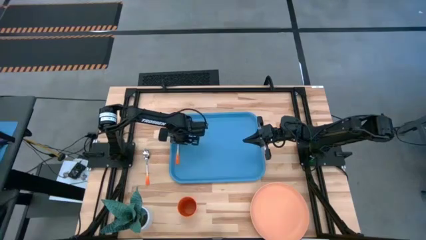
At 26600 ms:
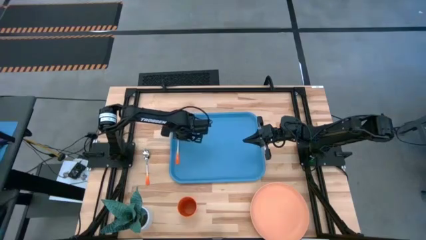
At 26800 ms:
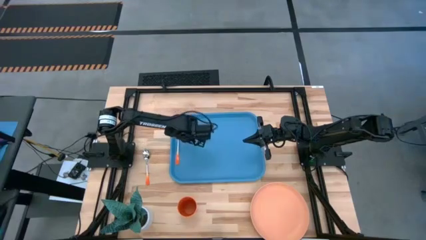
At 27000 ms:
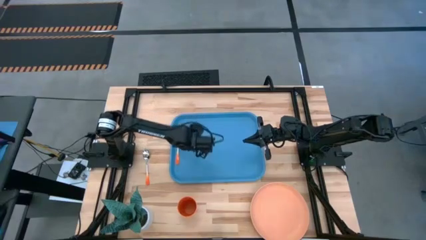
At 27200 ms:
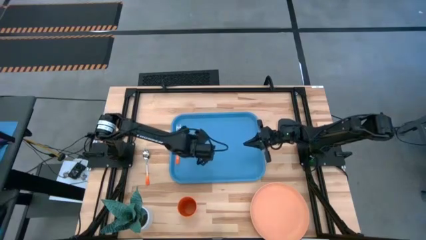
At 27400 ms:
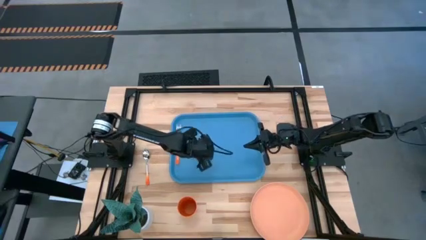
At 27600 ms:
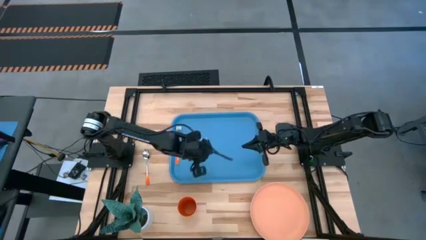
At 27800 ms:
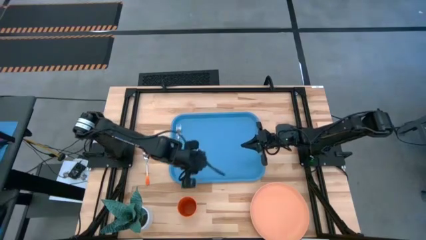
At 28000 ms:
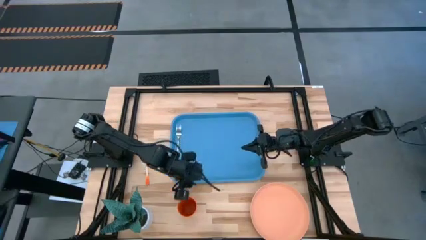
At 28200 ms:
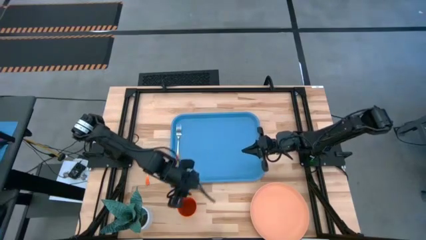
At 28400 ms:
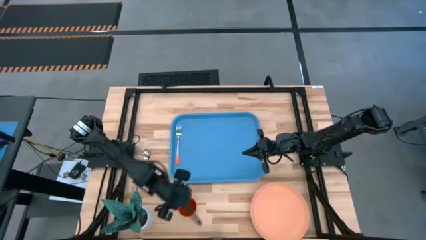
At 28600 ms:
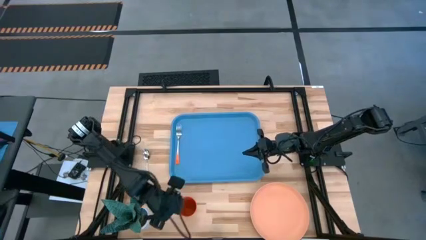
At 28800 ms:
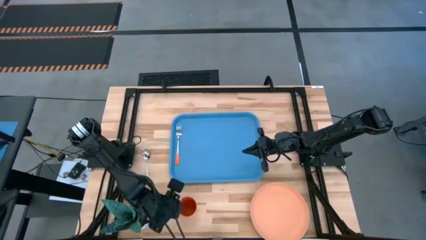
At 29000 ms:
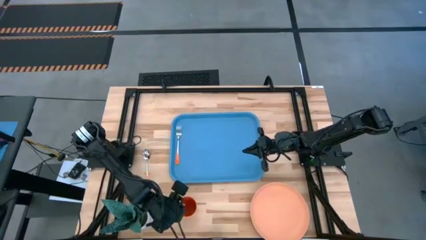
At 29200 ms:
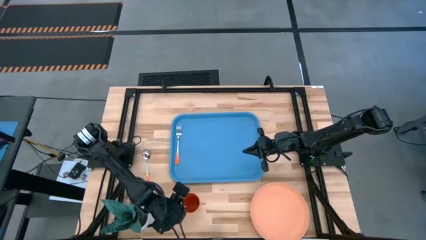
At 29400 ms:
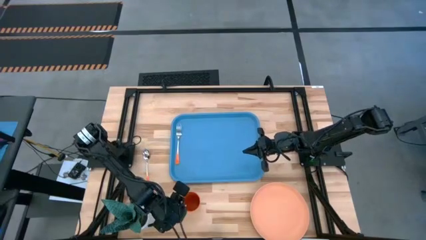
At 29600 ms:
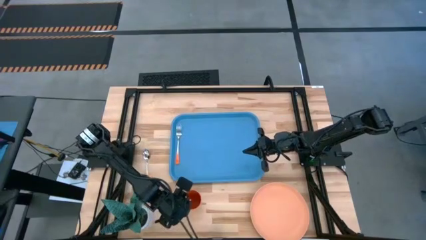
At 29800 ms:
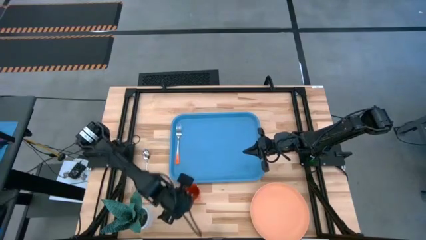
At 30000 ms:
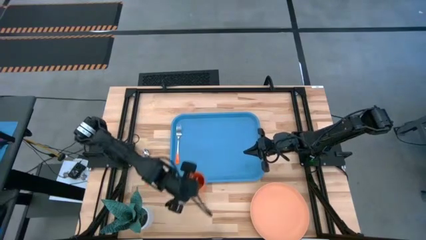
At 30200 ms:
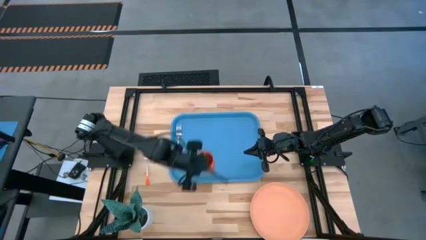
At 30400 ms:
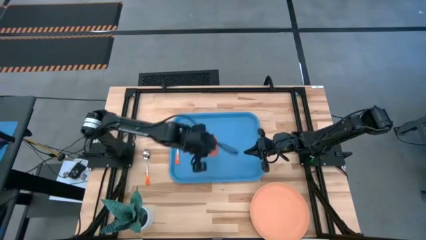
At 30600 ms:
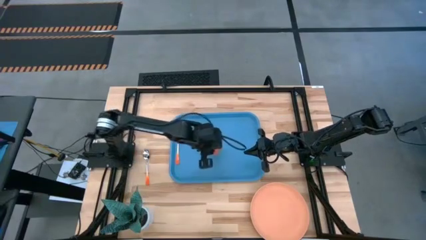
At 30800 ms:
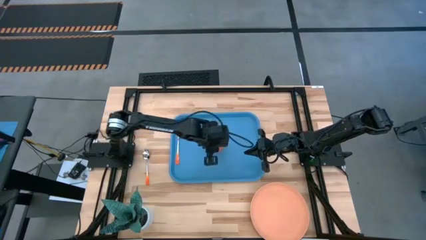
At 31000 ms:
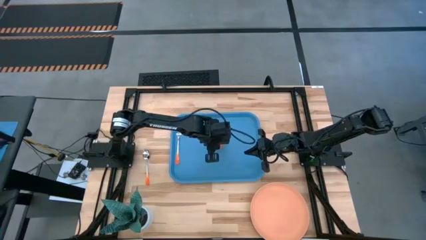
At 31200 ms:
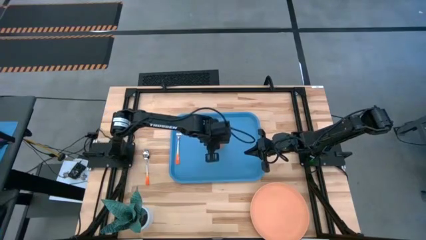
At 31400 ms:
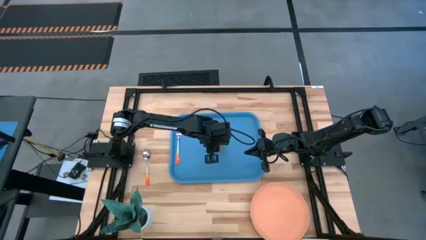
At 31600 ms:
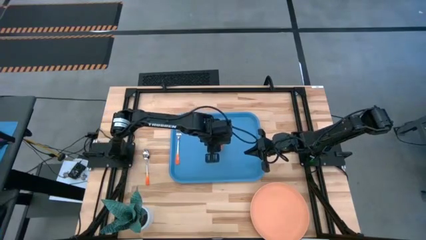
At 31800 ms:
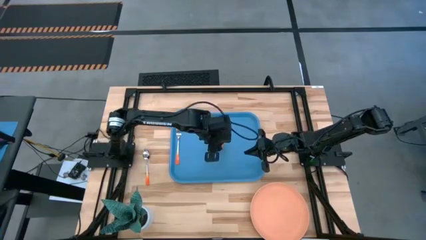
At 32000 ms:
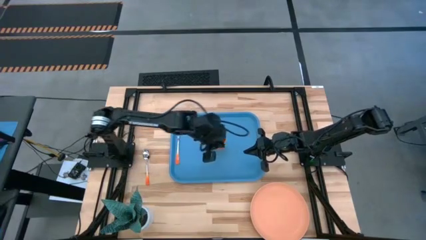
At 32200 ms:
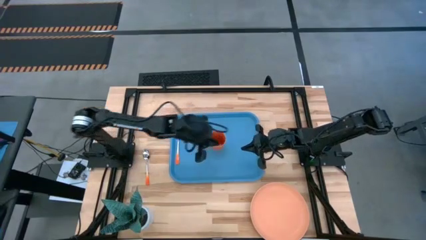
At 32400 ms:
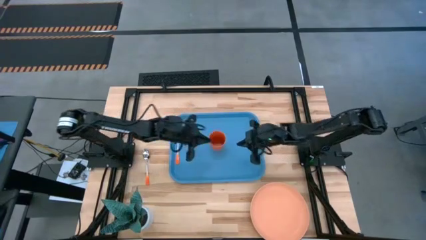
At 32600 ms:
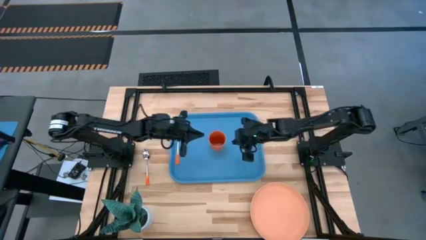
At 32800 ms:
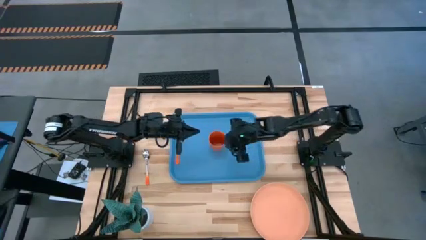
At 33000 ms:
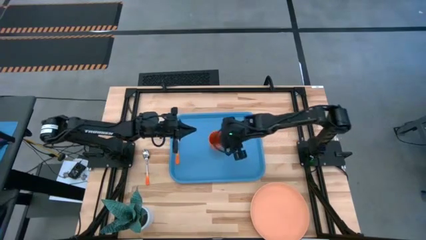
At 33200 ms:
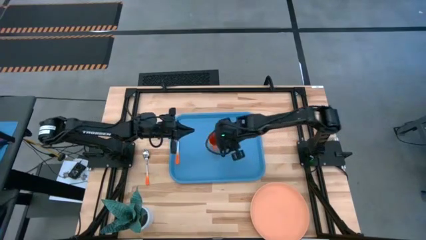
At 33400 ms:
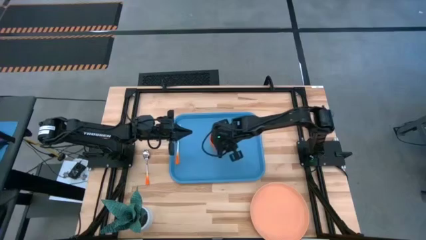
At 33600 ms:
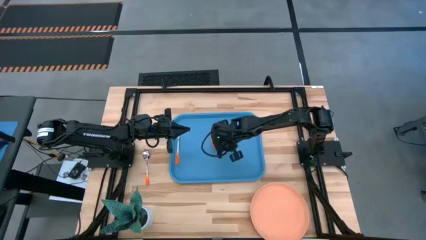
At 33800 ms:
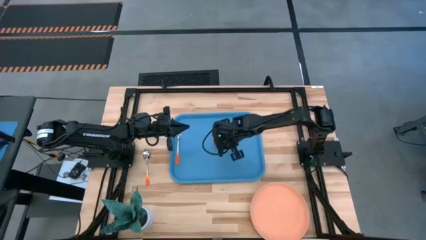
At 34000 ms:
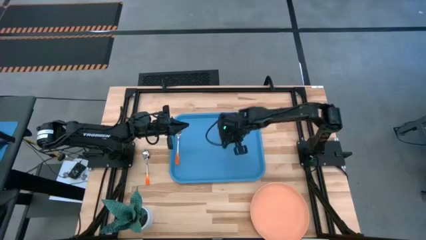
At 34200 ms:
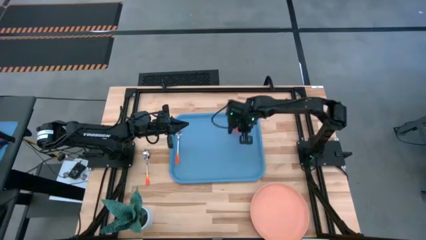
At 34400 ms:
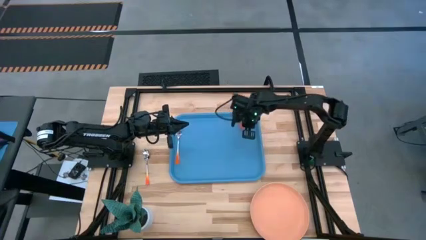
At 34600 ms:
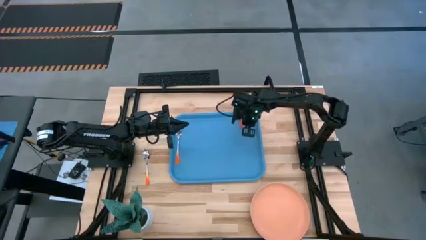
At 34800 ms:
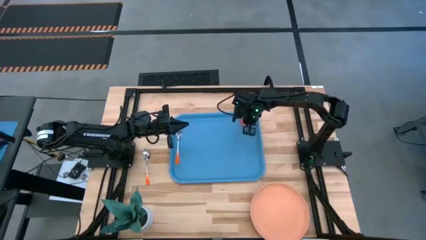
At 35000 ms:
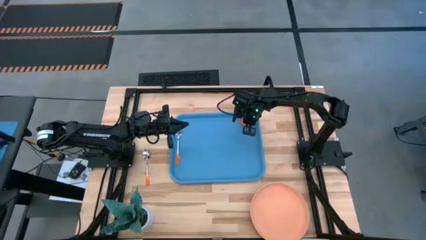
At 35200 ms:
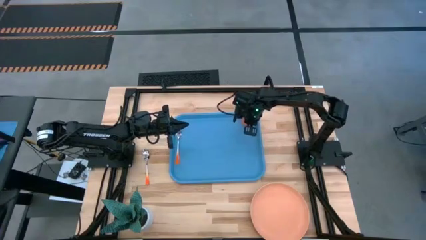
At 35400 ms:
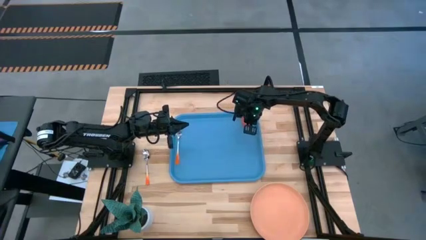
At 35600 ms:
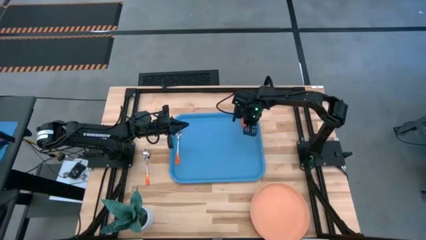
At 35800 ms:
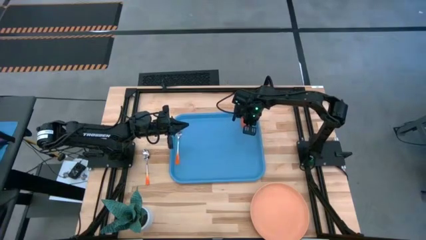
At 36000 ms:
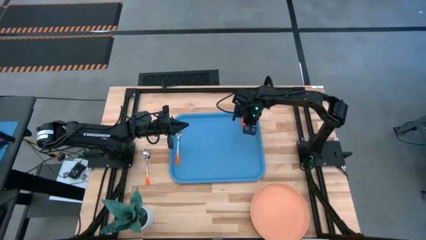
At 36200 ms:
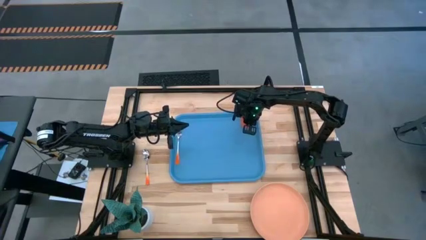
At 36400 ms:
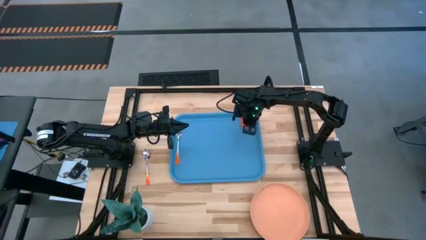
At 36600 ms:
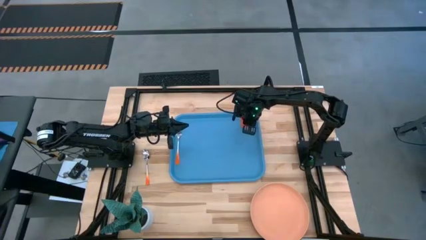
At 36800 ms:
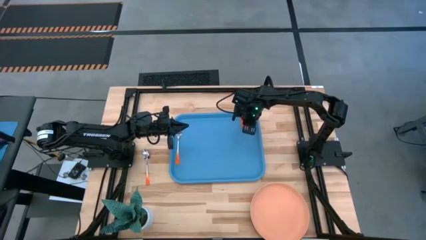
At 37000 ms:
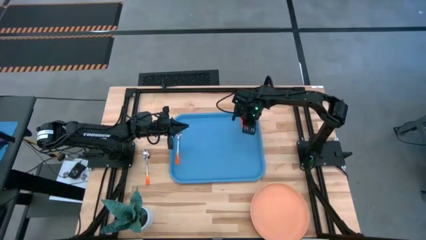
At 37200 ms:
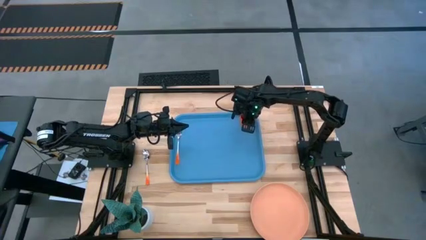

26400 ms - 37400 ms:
Task: Pick and place plate/cup/fork/spoon on tray
Put the orange cup on the top side of the blue serving tray

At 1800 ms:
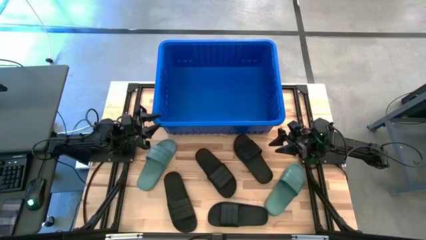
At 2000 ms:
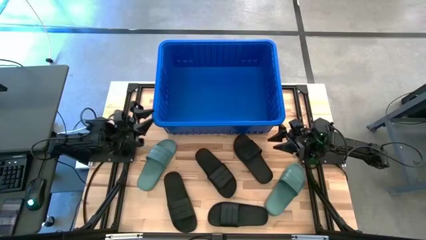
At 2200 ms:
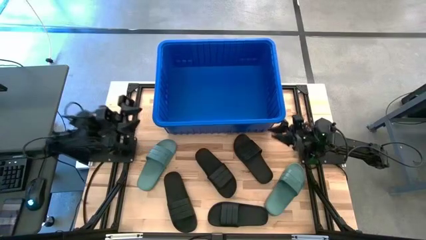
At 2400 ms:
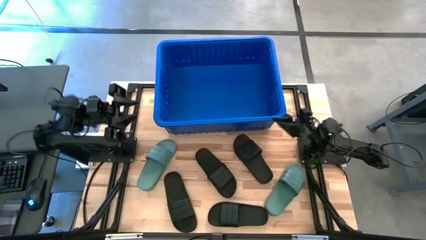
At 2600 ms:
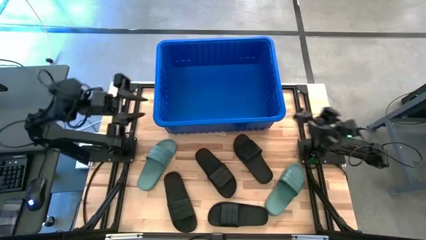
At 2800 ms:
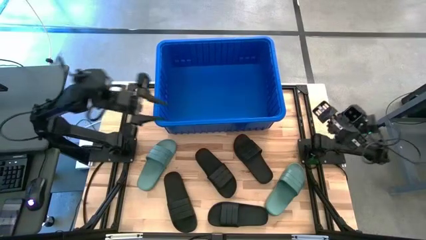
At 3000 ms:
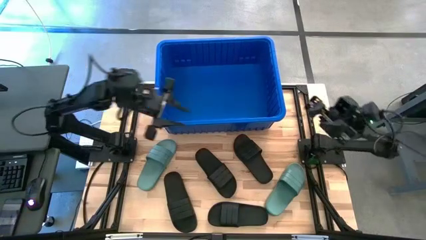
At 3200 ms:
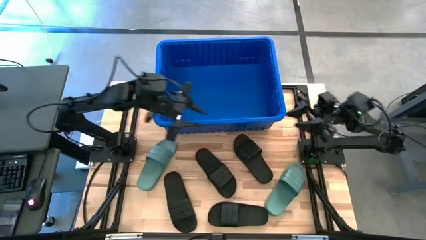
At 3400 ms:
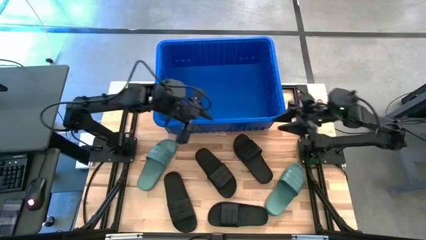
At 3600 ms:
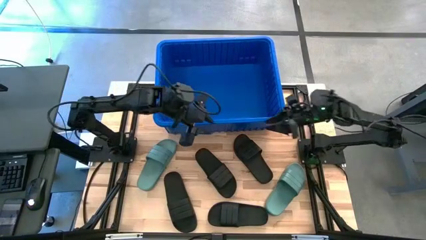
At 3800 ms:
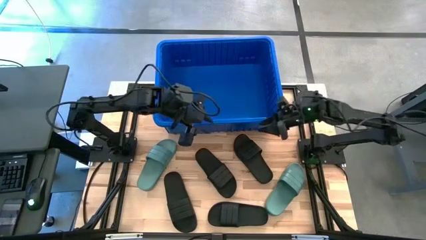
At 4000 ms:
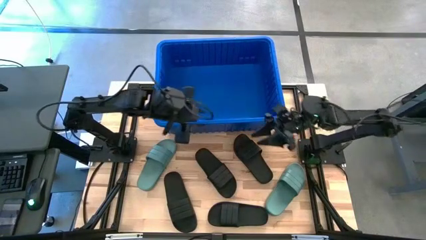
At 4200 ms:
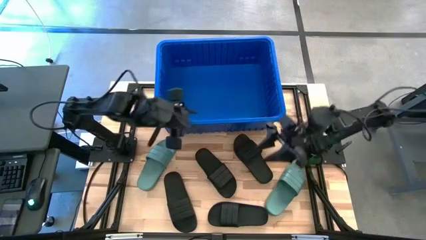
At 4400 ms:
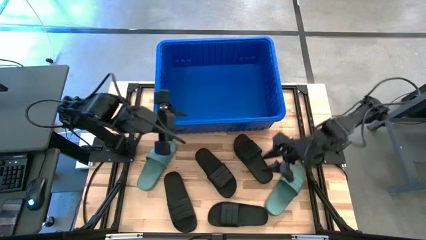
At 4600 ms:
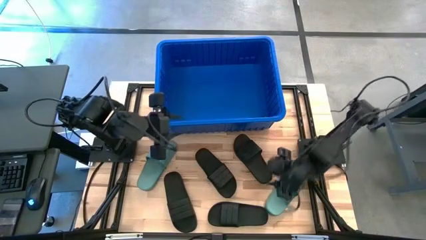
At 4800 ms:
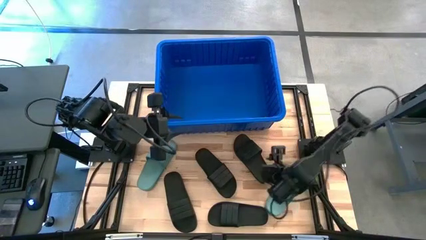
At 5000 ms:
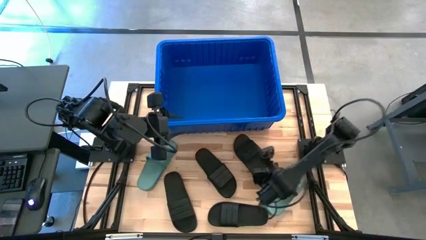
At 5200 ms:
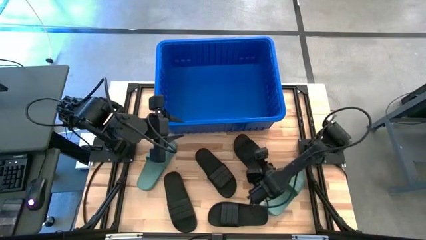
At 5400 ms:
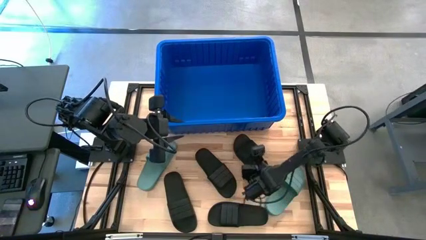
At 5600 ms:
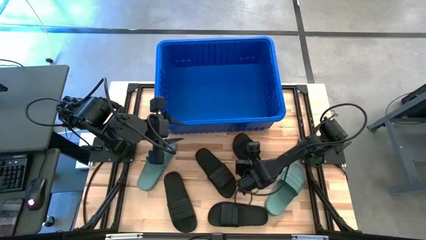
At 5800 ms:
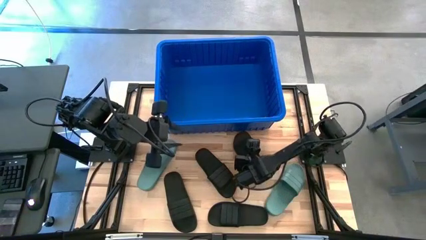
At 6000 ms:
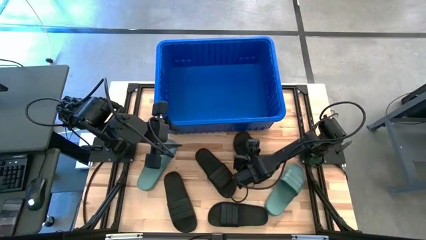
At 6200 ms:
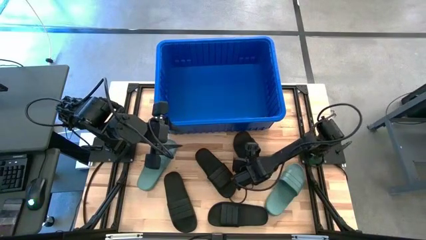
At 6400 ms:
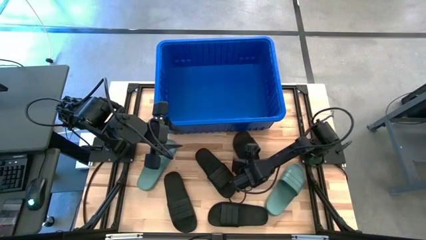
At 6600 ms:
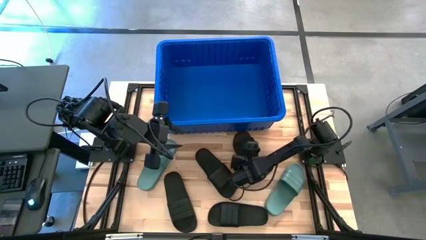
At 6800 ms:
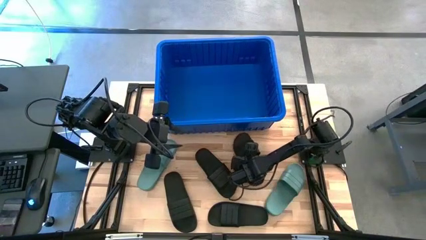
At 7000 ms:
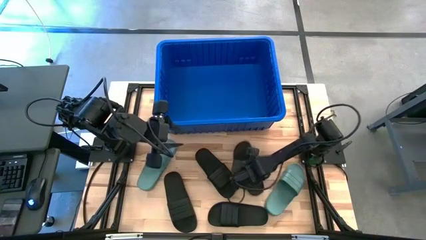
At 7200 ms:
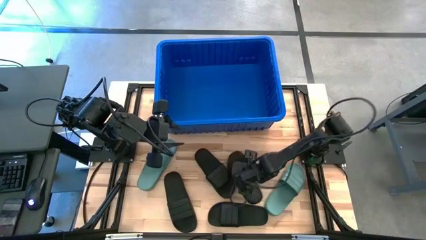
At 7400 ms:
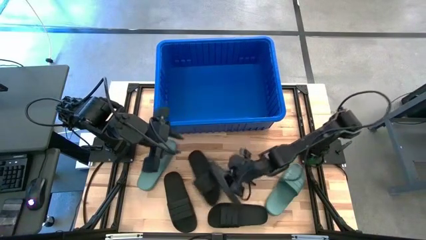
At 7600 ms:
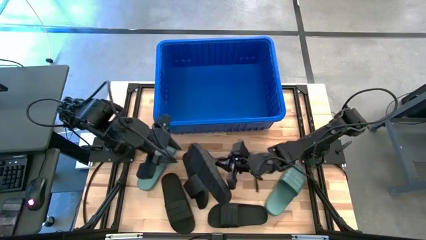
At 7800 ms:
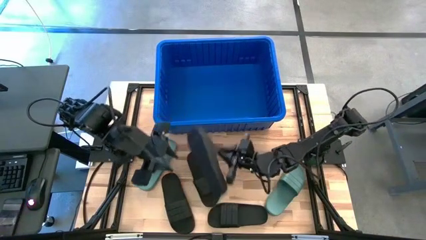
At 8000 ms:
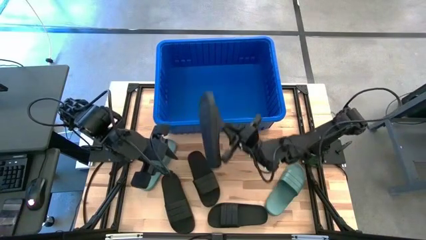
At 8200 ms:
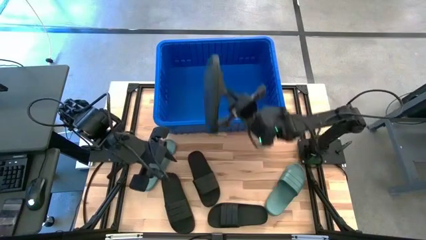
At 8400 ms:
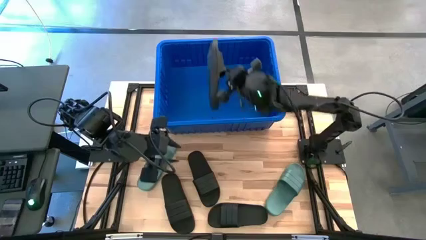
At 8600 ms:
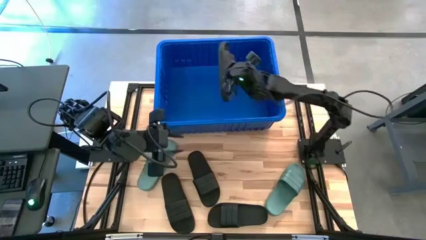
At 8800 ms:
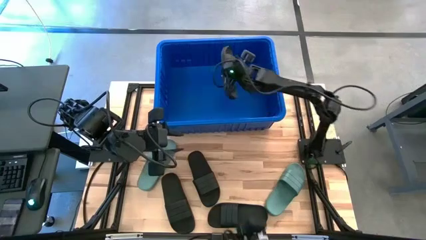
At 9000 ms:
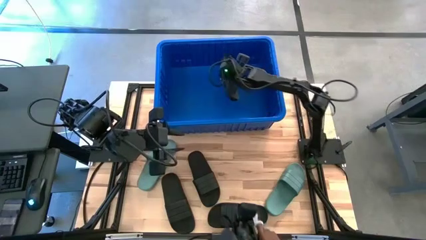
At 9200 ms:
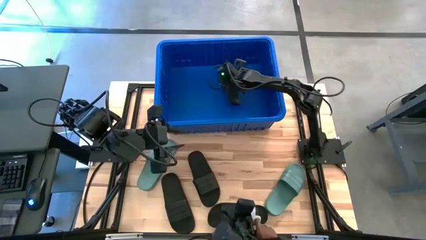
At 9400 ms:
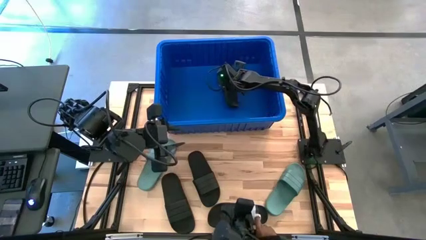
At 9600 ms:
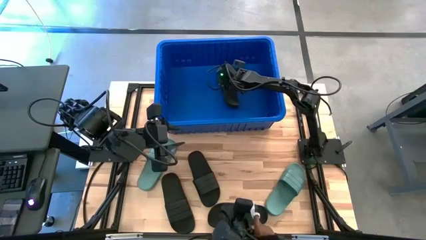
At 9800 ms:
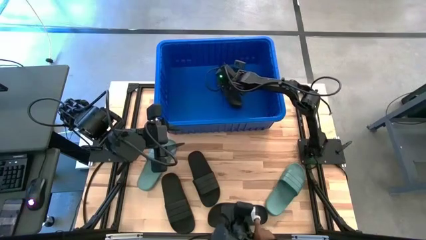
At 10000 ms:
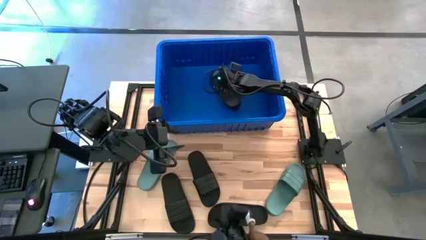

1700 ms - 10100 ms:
Task: Pick and place slides into bin
Put the black slide into the blue bin
